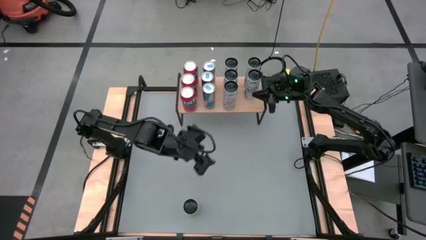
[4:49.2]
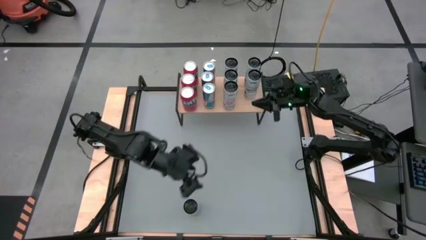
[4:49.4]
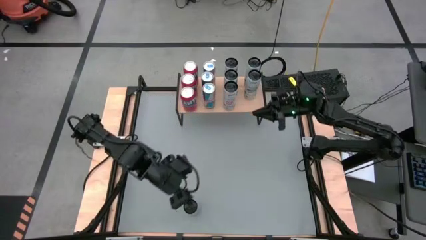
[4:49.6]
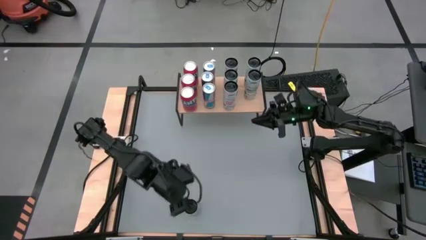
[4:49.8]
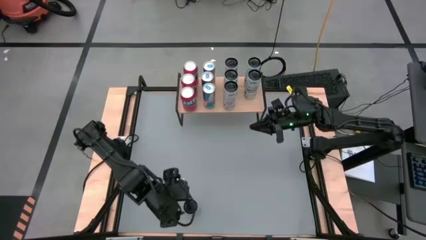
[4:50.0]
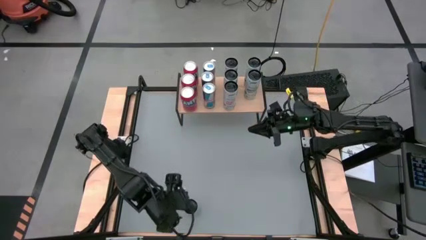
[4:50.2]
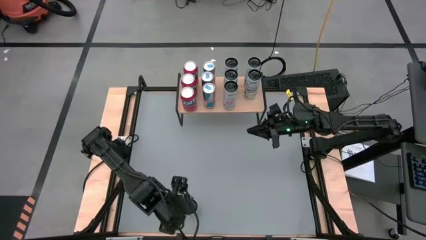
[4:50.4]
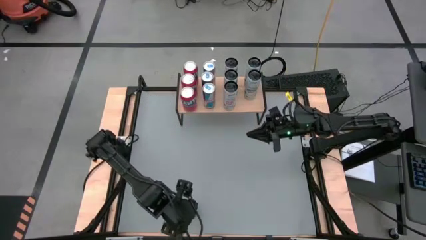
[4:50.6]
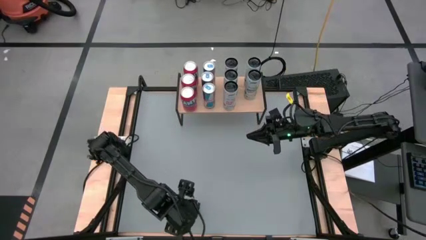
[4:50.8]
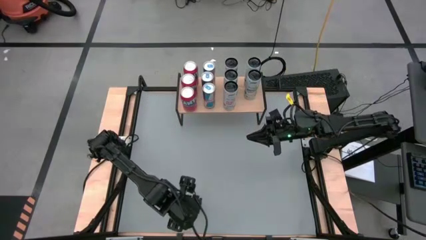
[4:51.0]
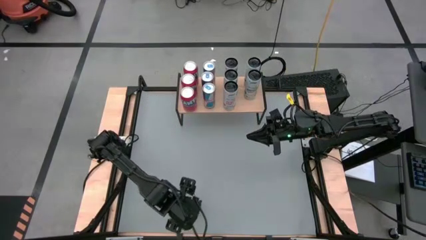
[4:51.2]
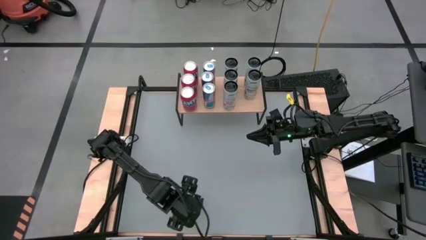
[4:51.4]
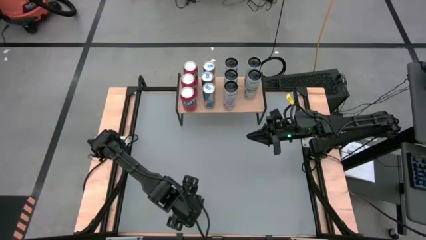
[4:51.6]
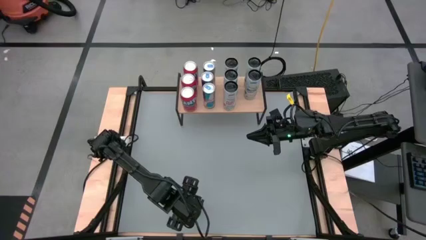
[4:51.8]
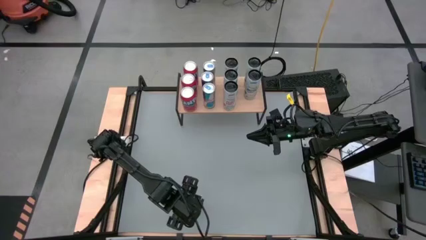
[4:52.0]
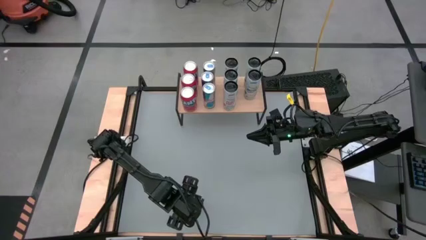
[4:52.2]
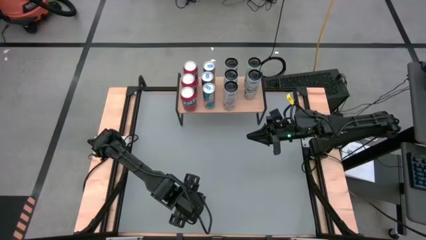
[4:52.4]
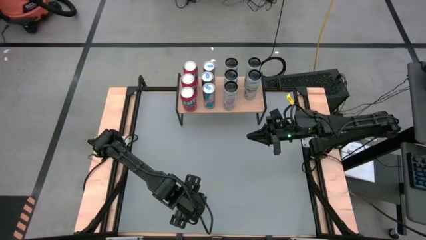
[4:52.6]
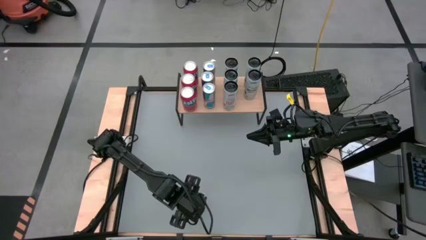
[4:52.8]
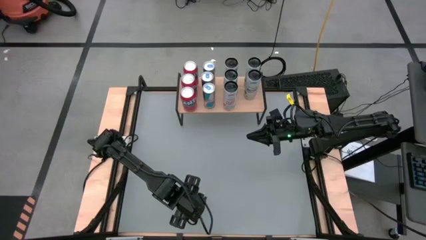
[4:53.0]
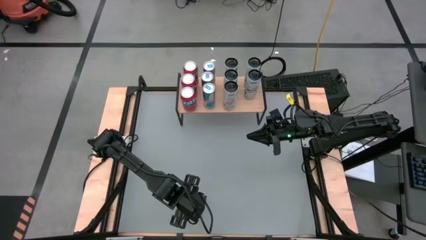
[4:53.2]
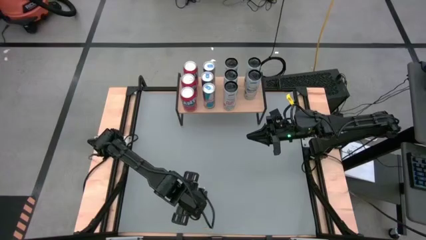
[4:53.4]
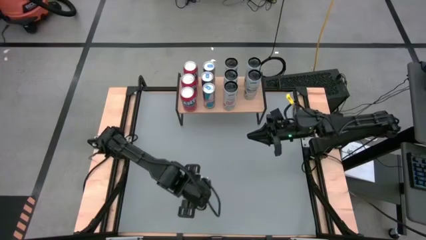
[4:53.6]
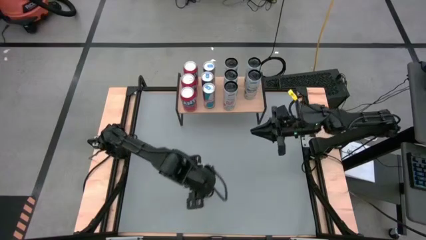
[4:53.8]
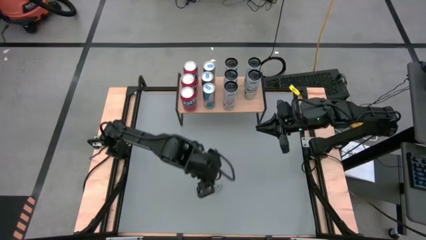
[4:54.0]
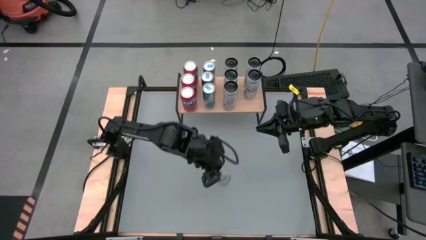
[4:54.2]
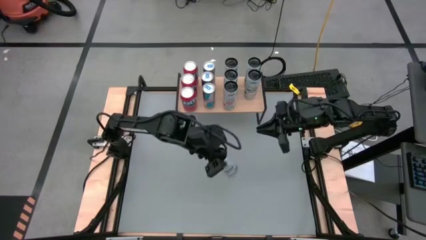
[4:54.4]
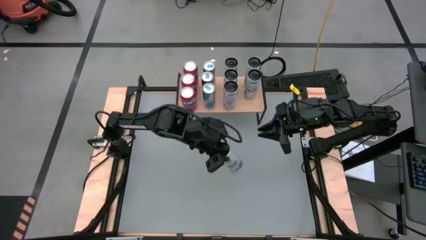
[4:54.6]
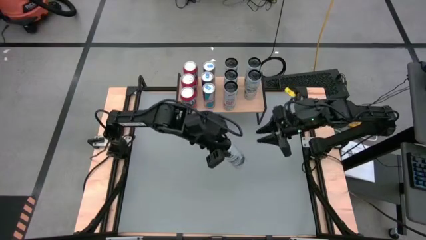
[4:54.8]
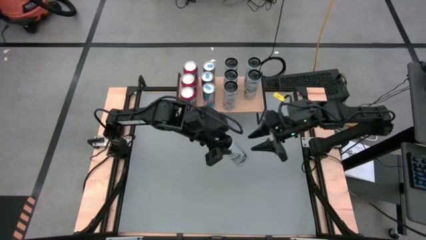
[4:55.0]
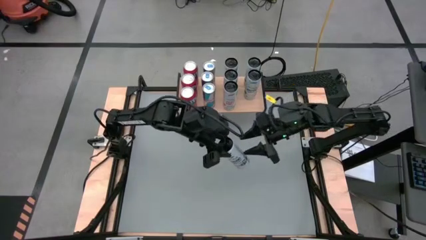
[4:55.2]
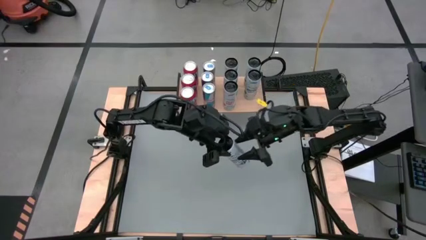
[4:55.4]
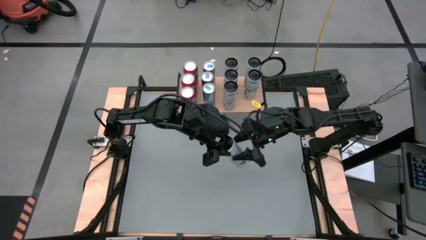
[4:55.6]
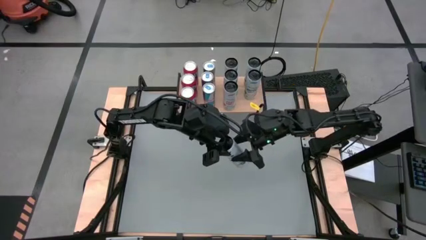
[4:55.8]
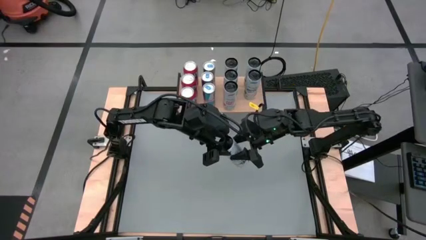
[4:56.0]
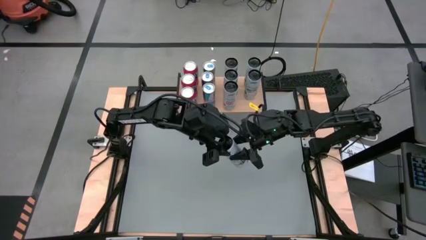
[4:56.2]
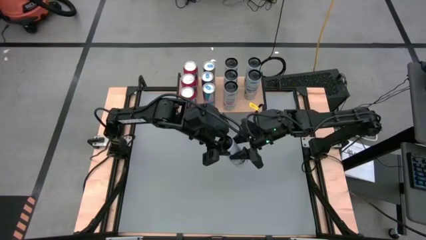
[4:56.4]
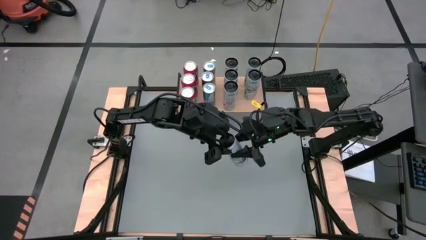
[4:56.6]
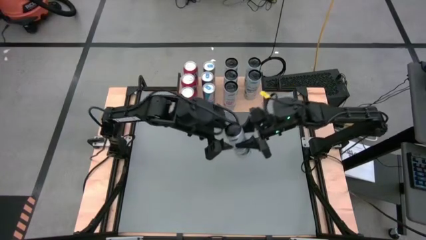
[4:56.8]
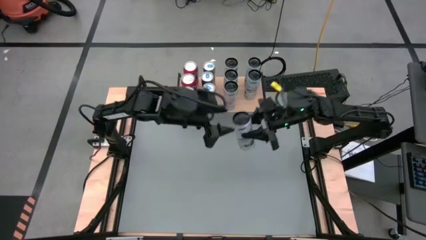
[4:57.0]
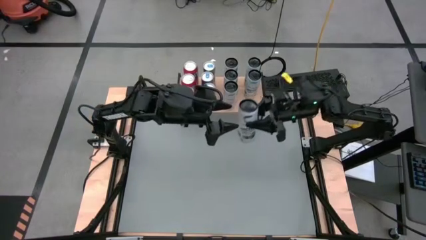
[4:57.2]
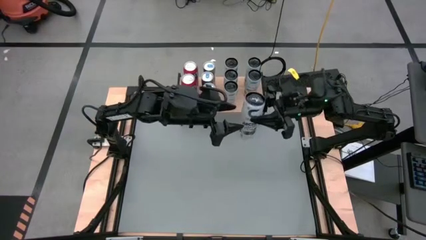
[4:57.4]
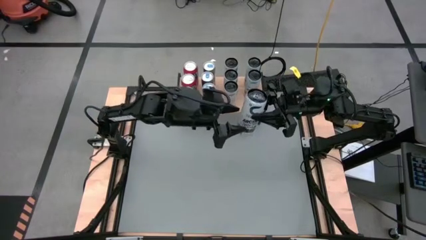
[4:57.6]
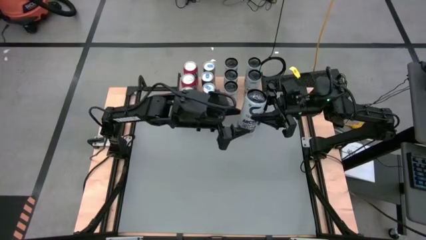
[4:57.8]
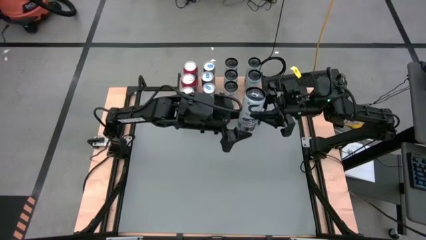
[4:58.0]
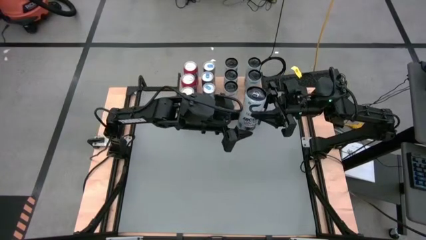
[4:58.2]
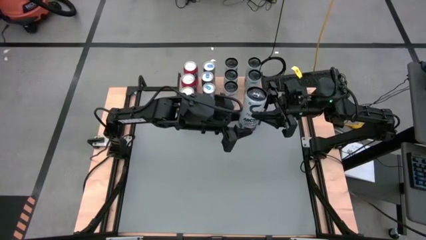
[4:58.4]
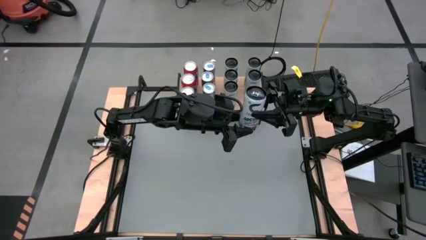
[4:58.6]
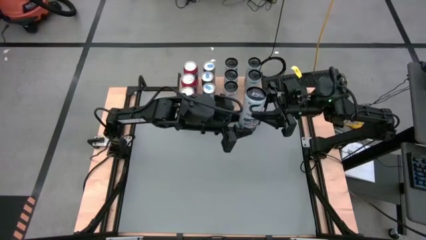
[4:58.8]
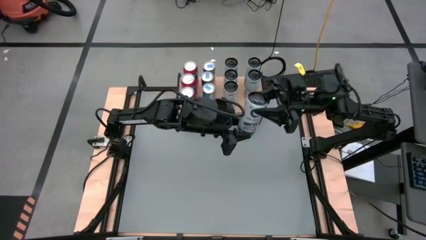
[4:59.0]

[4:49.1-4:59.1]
Task: Place canned beverage on shelf
Put the white-blue soda can on the shelf aligned with the other white-blue soda cans

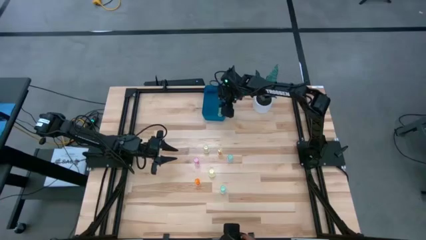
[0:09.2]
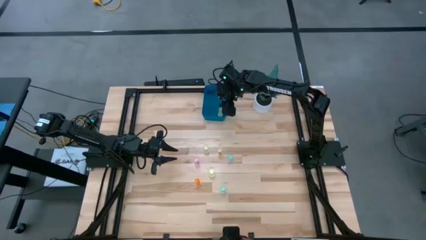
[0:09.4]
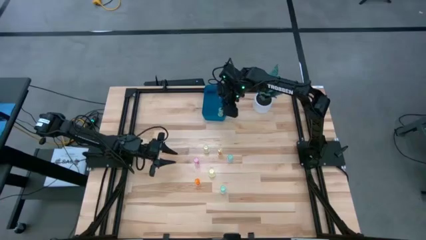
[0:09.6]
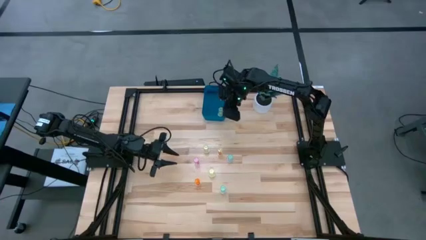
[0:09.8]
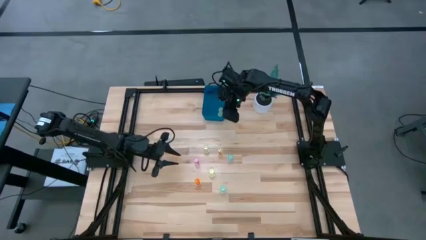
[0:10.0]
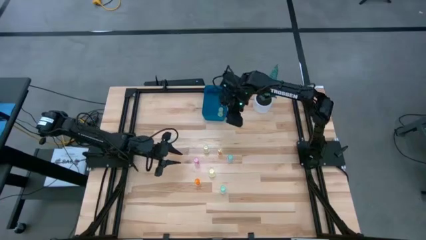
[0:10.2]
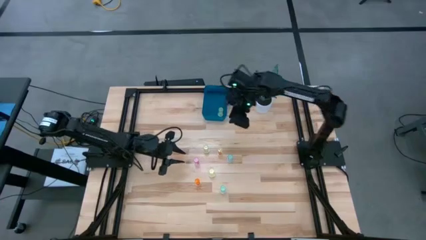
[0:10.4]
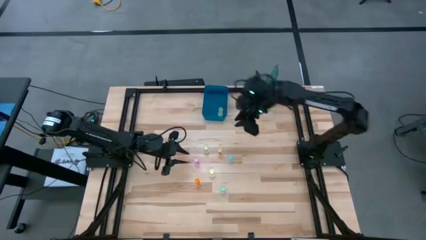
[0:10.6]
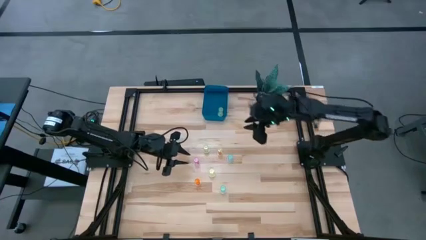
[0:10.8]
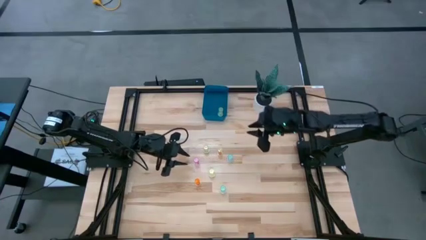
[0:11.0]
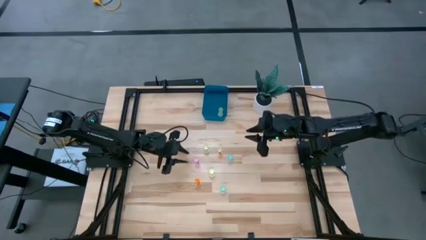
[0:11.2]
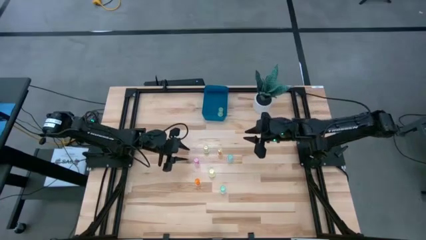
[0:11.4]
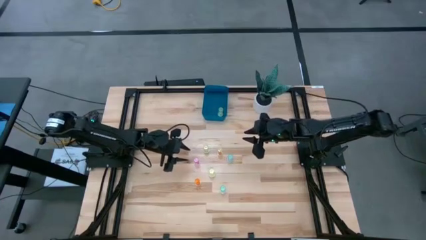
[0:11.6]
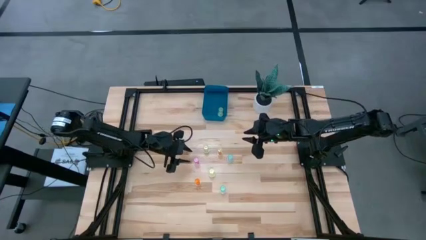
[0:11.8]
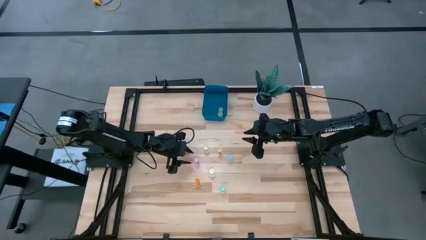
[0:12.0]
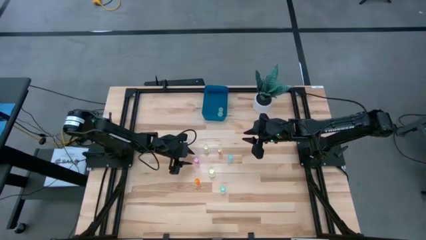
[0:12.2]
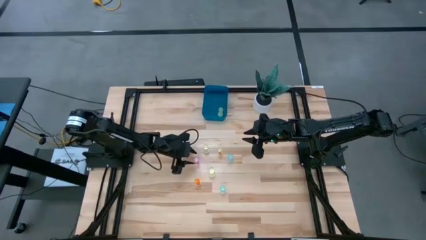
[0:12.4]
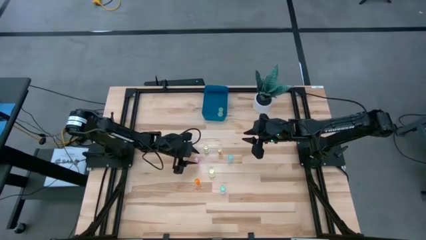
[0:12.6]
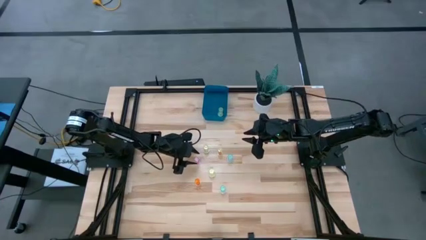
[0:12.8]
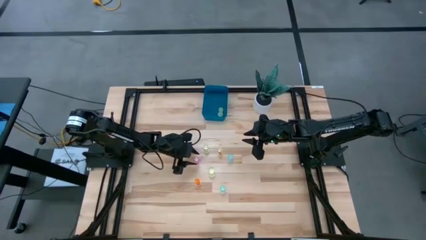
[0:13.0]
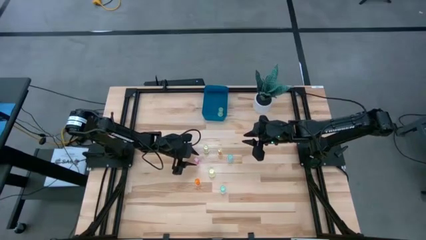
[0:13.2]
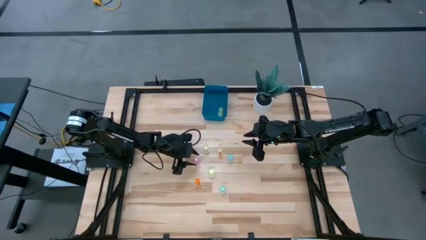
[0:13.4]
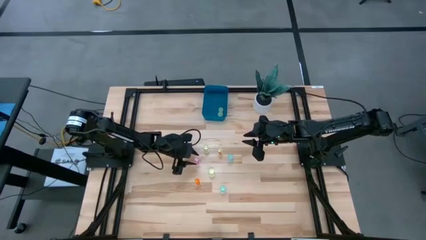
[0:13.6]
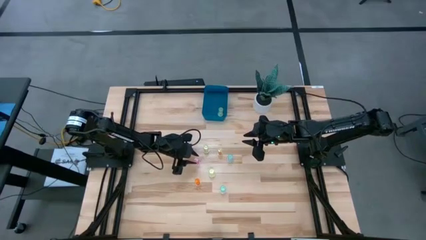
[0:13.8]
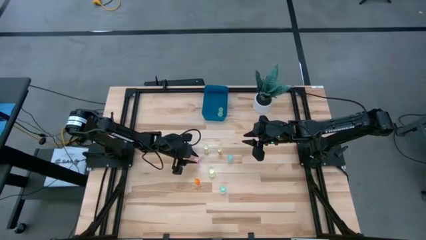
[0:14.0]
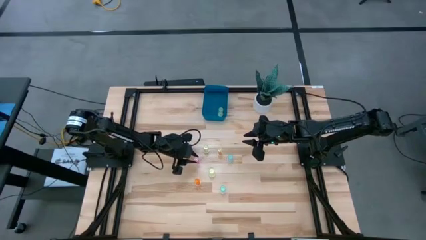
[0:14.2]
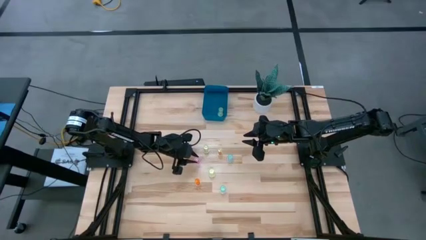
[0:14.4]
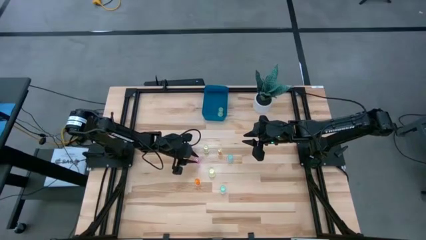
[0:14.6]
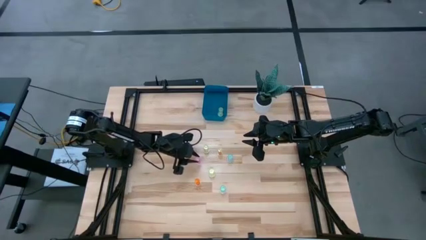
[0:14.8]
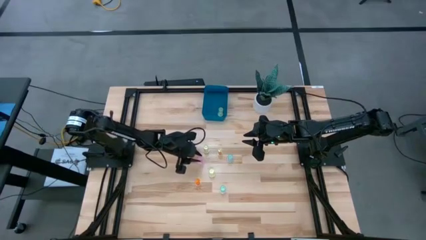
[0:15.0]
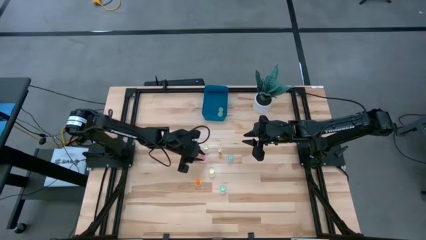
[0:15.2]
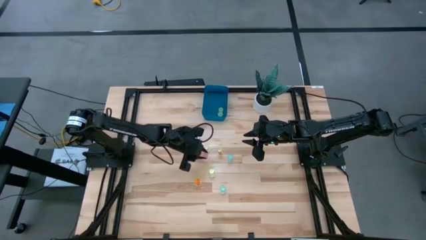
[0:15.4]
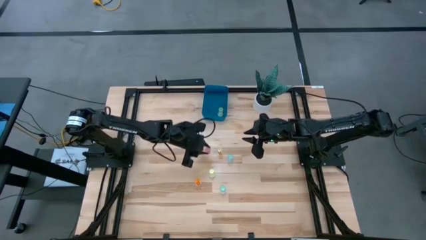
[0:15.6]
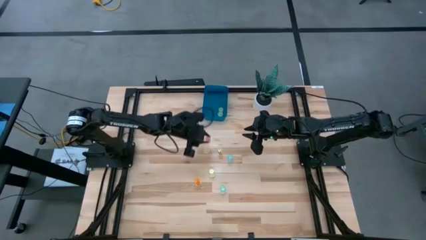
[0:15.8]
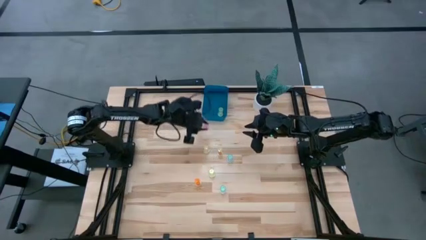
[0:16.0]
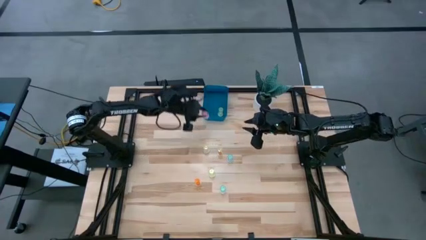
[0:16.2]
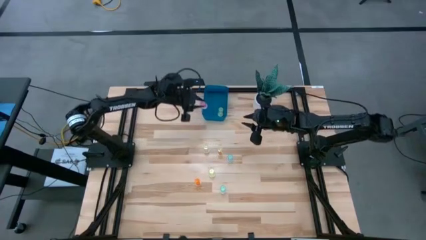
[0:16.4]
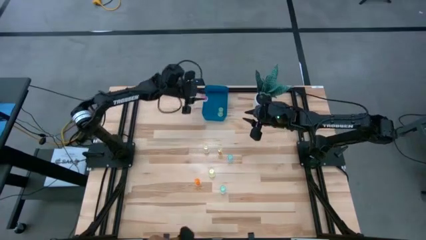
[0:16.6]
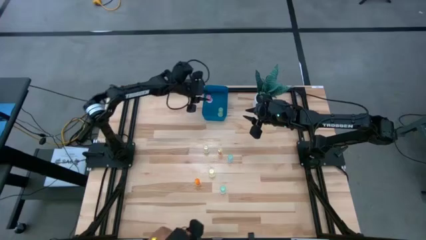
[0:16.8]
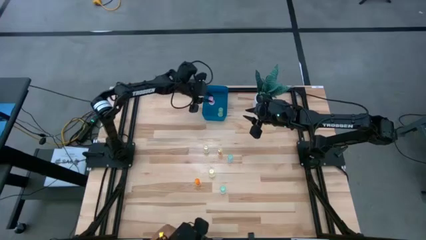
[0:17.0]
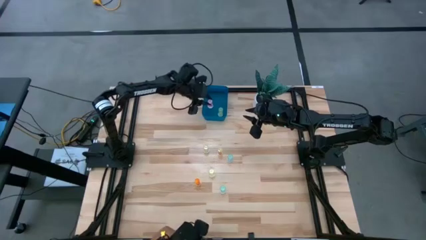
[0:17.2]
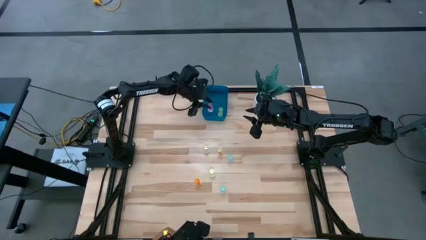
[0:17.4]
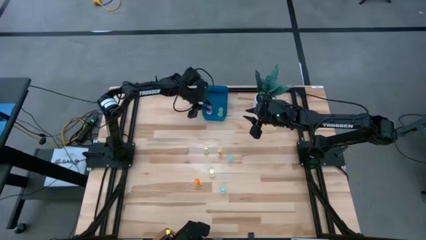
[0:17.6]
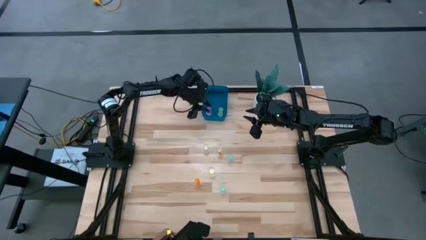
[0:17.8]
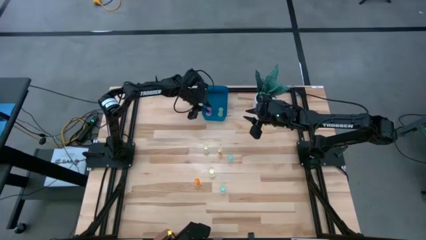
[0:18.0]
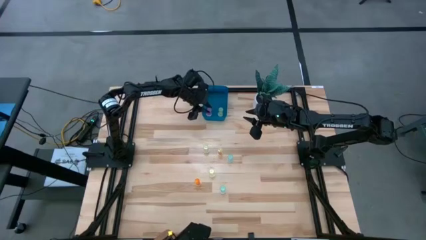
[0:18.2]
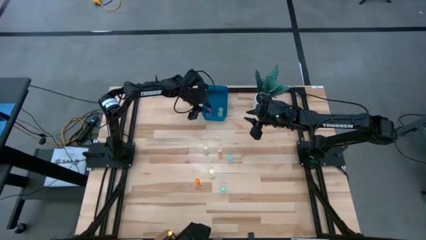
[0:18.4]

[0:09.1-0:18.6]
Task: Pick and place pill bottles into a basket
Put the pink pill bottle into the blue container
